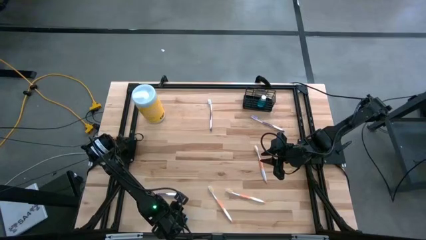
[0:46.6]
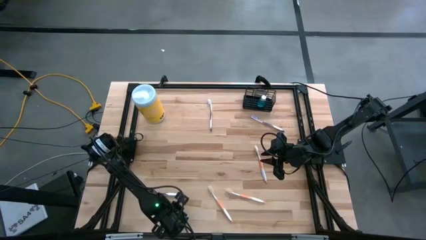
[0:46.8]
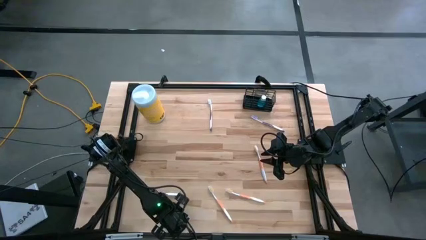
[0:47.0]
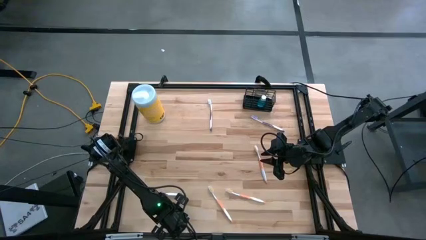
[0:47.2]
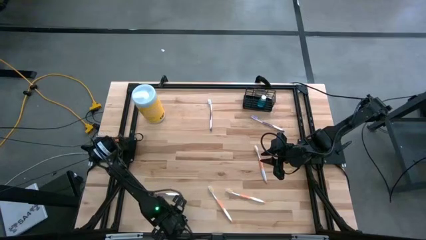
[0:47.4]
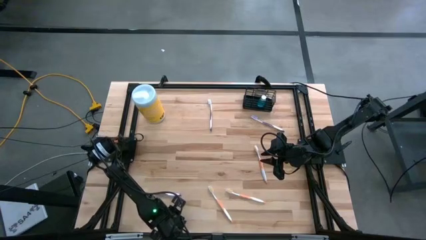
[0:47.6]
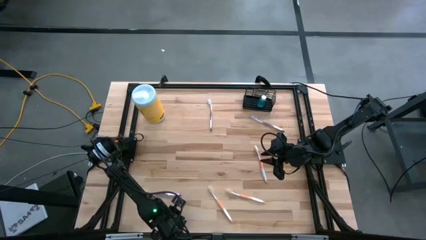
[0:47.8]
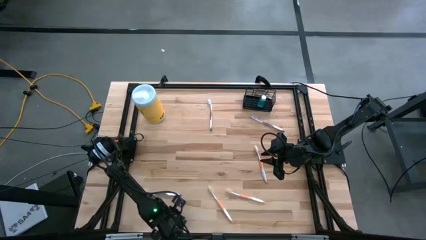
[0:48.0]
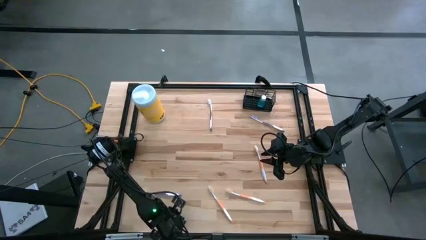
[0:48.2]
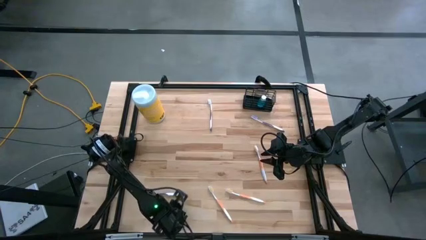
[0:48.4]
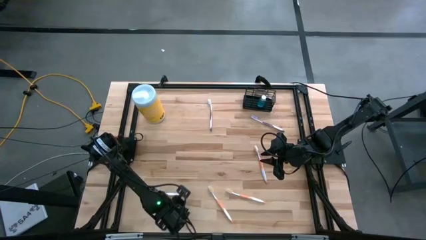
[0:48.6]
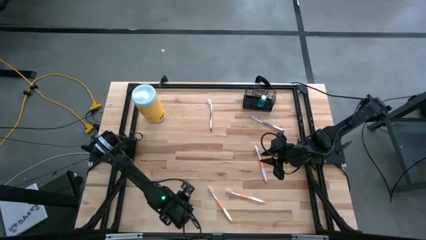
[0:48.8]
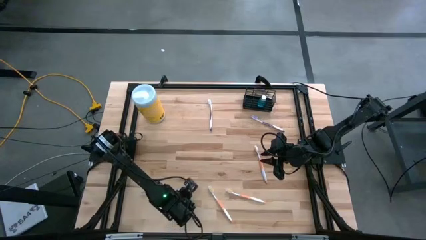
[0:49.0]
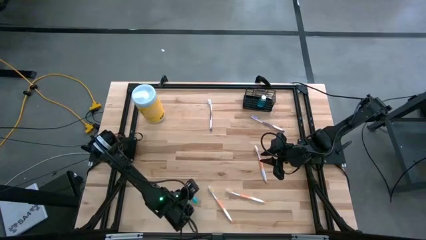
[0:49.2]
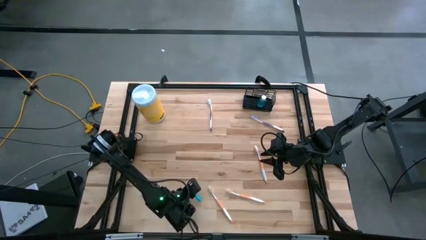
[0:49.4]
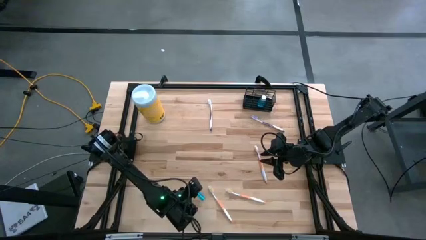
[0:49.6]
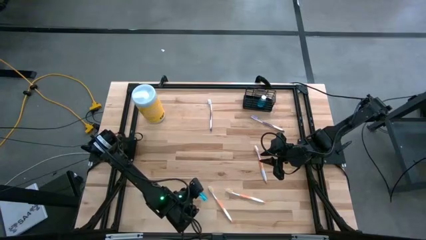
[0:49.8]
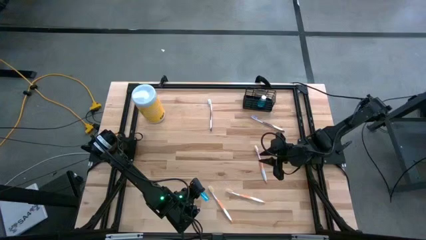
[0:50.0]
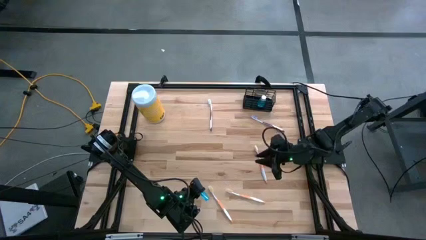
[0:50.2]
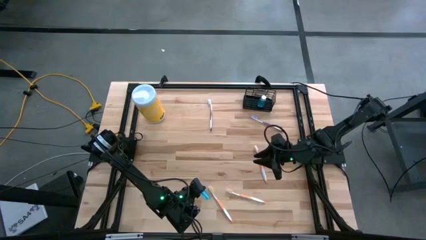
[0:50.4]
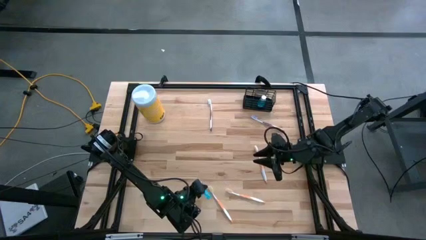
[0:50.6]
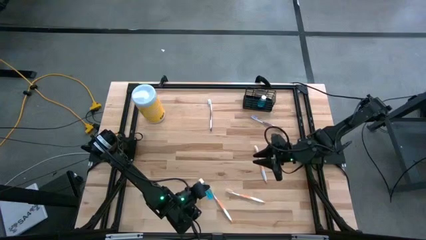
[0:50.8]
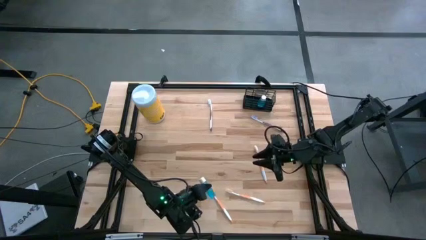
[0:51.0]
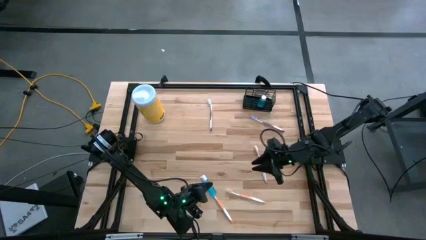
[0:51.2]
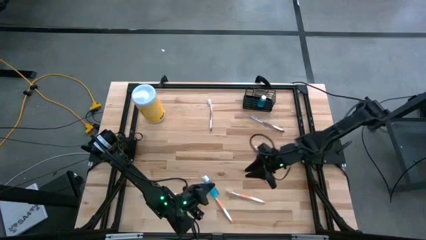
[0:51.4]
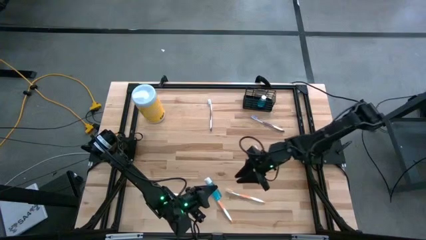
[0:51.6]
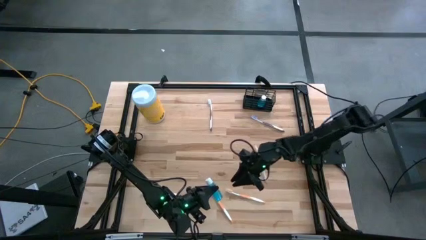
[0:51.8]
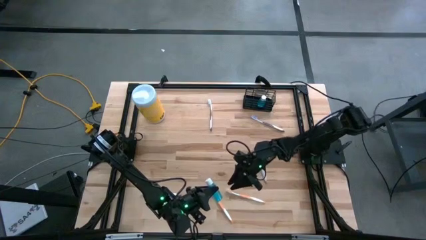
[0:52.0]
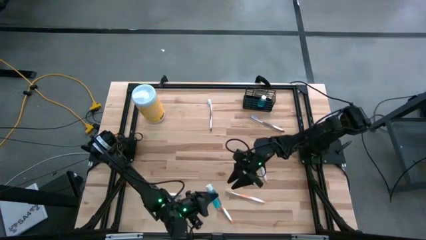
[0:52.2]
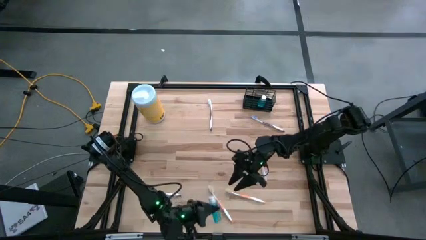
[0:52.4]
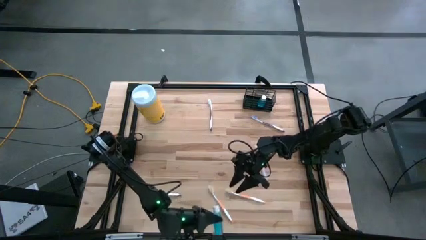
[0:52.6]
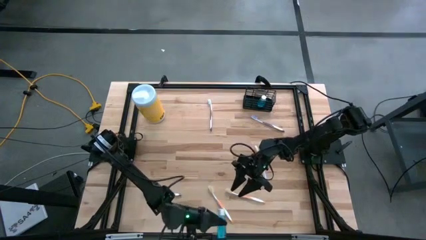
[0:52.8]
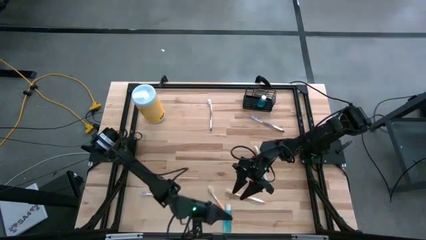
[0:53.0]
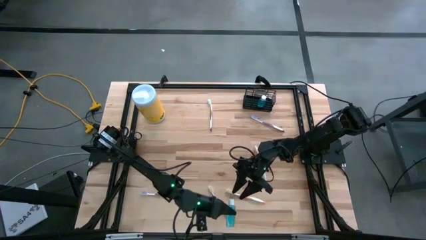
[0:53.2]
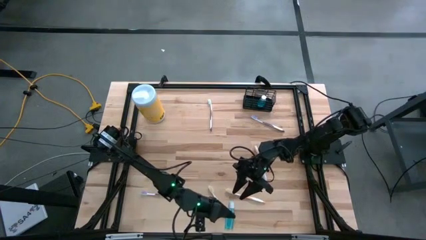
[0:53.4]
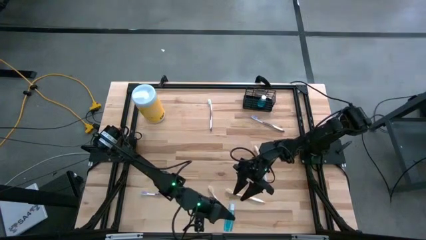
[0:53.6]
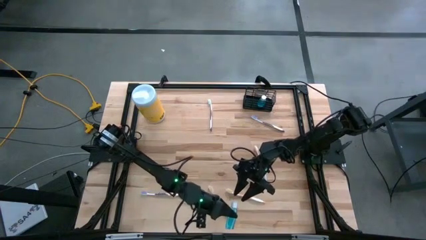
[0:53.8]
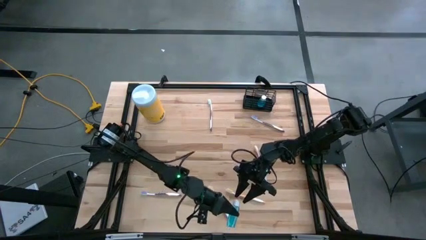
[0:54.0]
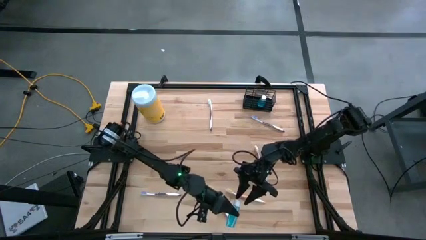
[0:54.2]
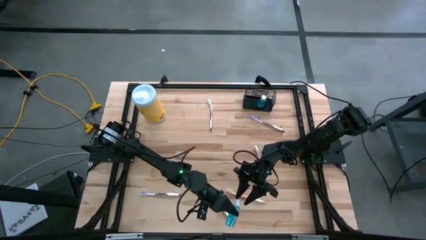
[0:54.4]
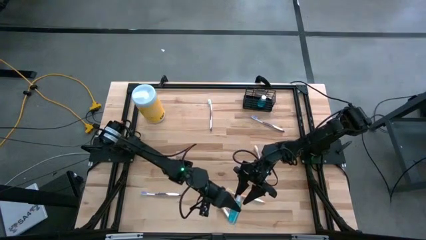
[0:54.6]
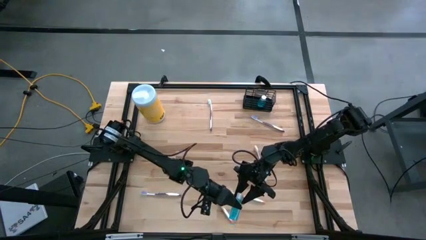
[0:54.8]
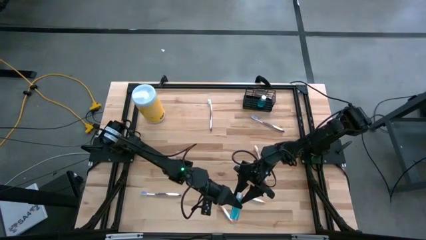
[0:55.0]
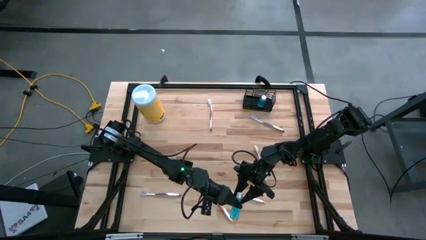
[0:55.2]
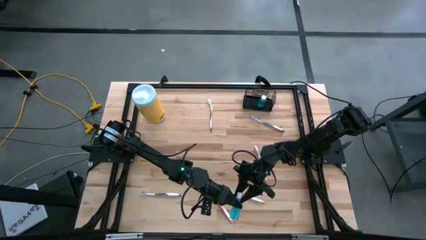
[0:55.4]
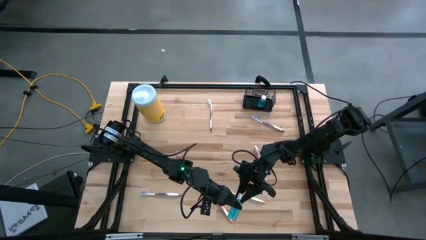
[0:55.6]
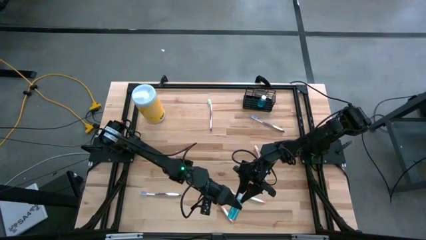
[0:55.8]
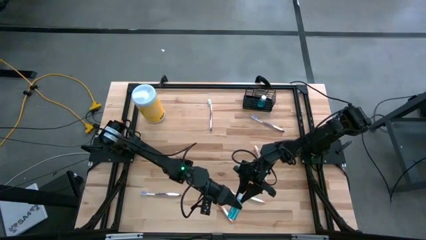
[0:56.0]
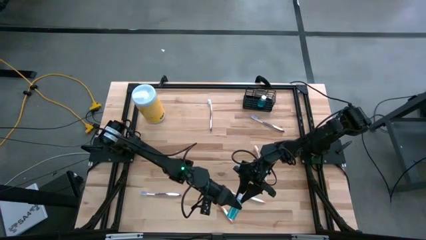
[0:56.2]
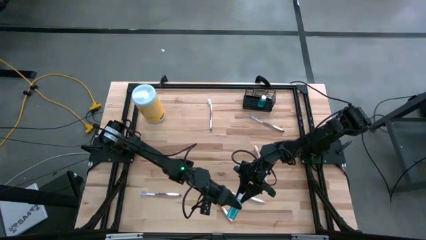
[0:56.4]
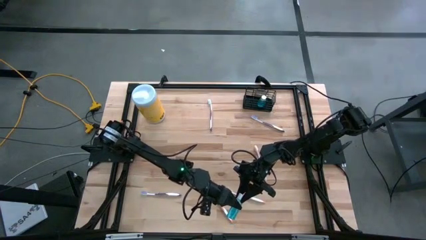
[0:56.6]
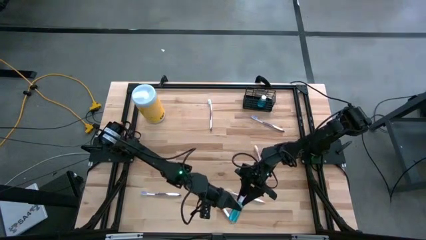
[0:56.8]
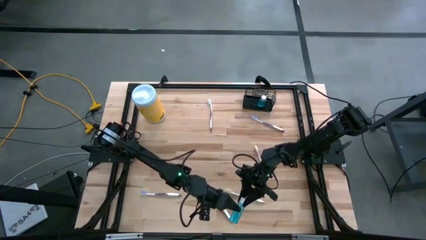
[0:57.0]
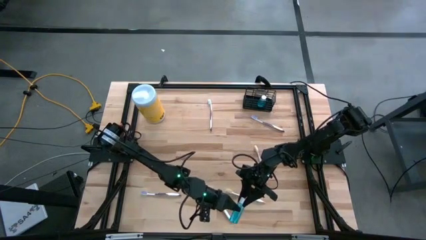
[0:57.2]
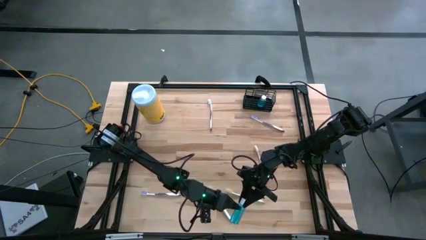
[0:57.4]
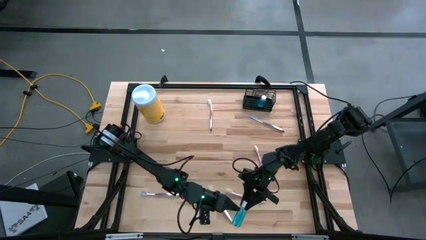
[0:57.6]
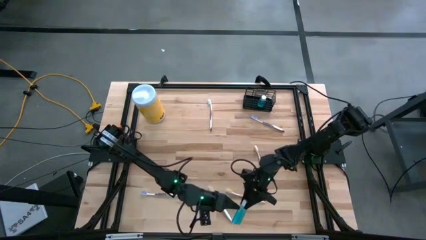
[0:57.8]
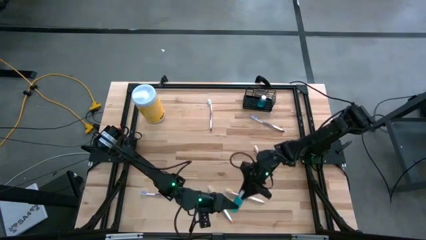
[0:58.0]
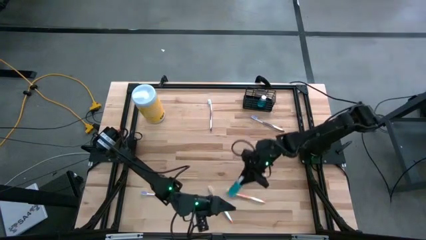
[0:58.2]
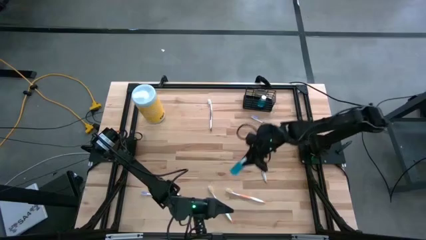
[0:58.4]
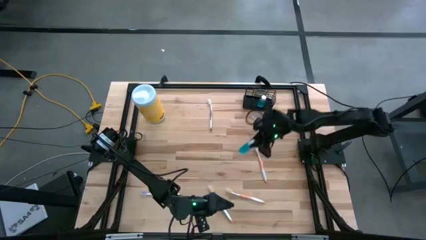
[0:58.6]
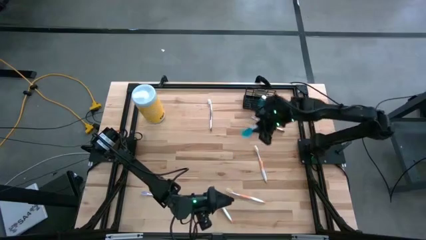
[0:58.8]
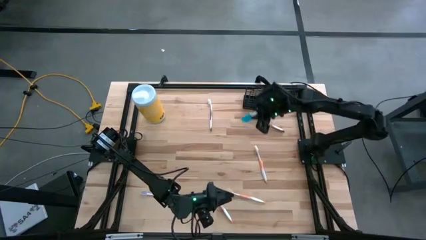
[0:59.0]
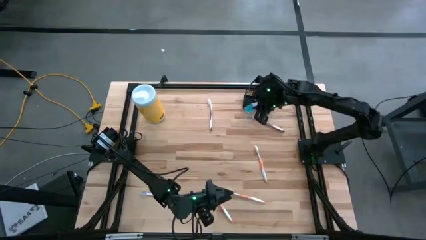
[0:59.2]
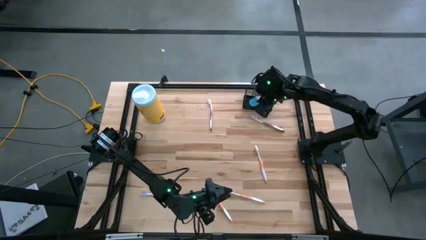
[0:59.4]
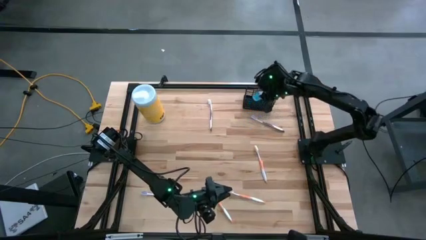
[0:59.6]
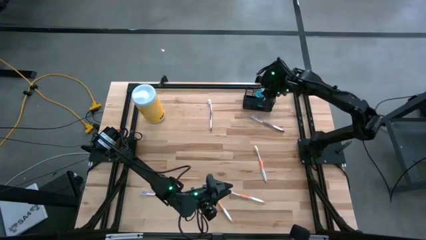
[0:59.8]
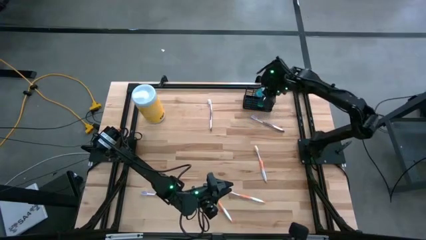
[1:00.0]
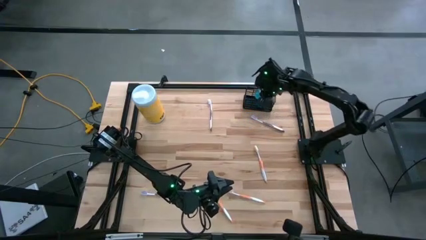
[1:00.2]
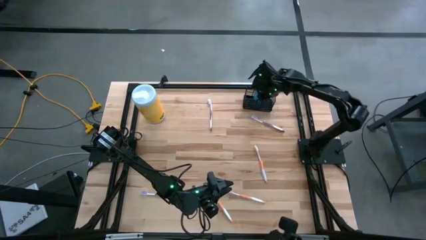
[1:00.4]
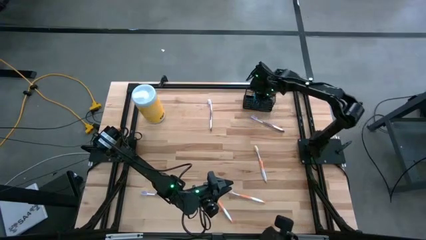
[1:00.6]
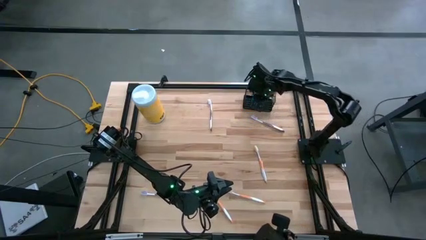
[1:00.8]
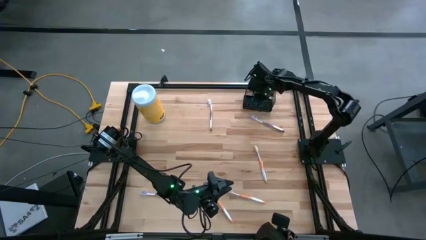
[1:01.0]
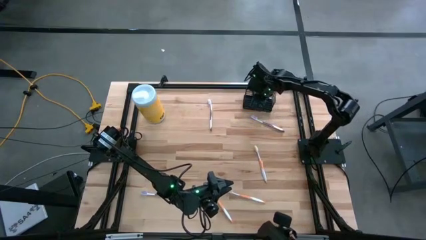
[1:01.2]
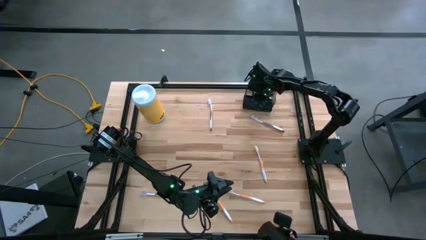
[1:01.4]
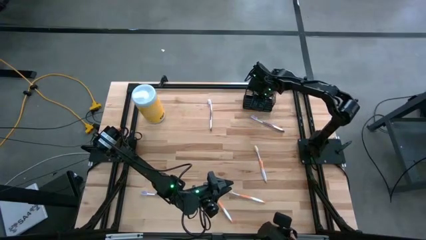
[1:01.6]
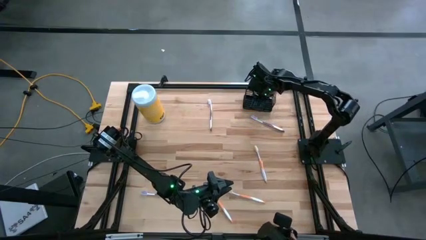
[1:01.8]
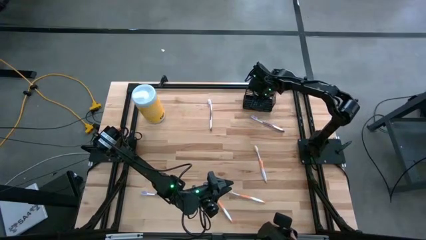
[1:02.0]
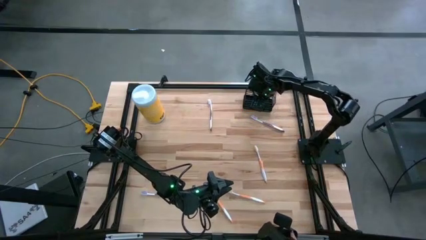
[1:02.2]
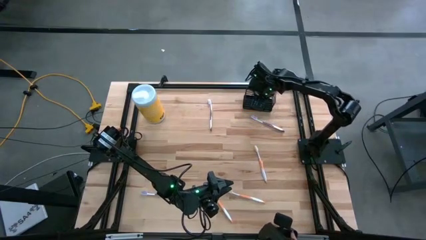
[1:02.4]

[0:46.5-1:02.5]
Task: Pick & Place toothbrushing station
Put the blue mouthwash into the black wire organizer
